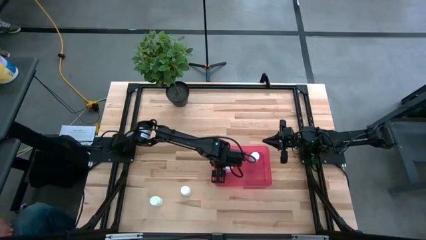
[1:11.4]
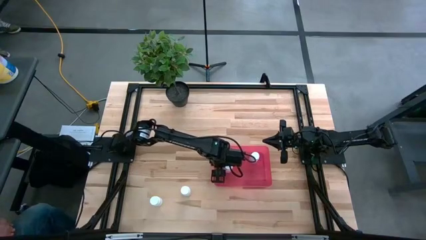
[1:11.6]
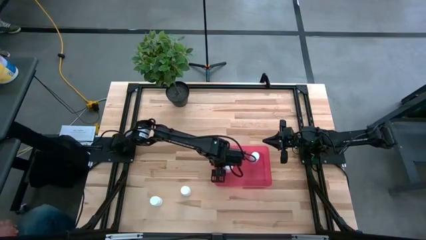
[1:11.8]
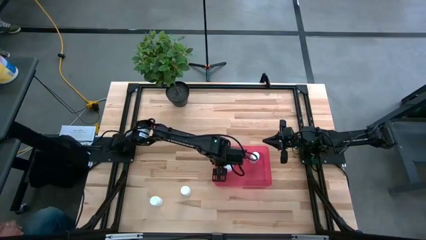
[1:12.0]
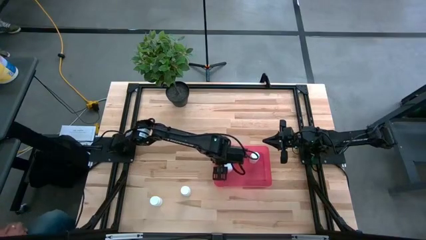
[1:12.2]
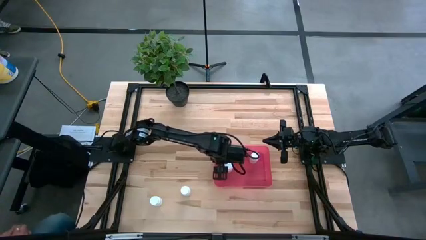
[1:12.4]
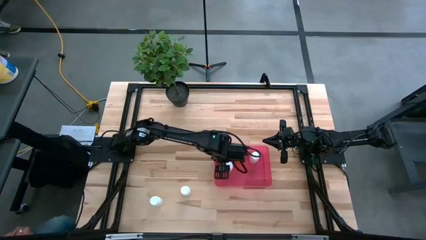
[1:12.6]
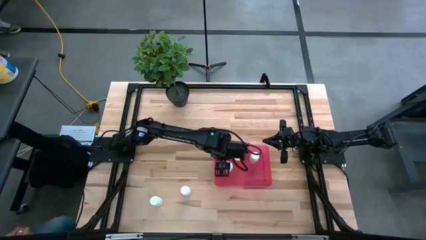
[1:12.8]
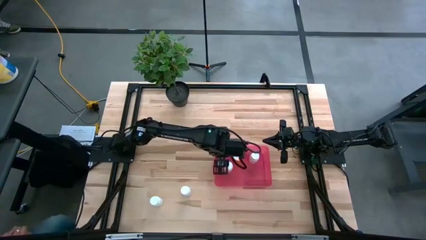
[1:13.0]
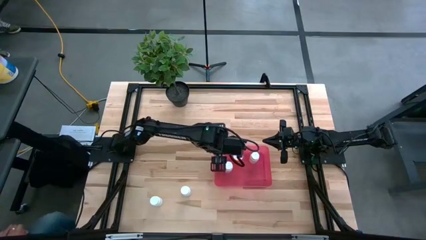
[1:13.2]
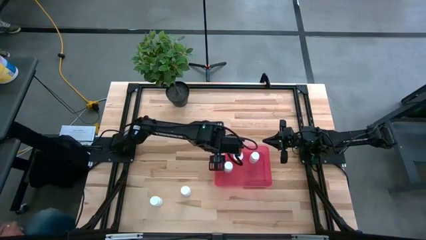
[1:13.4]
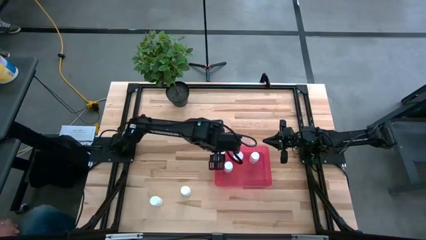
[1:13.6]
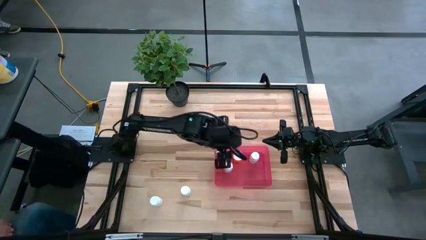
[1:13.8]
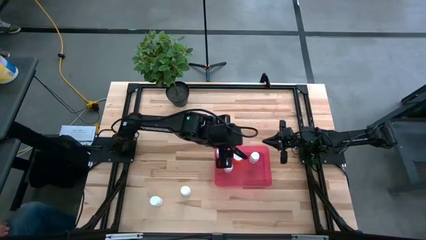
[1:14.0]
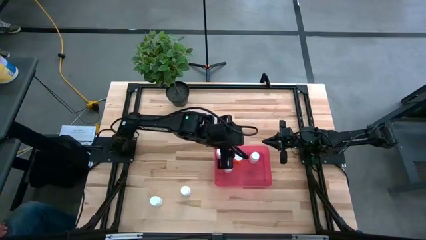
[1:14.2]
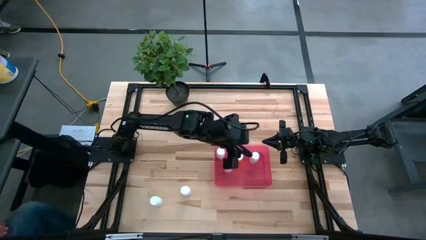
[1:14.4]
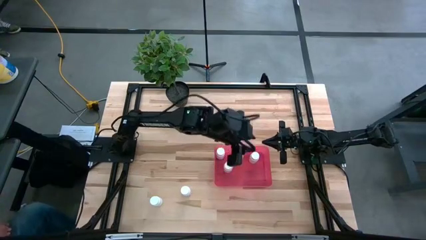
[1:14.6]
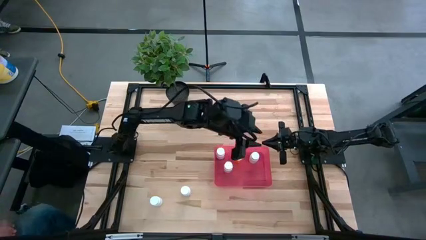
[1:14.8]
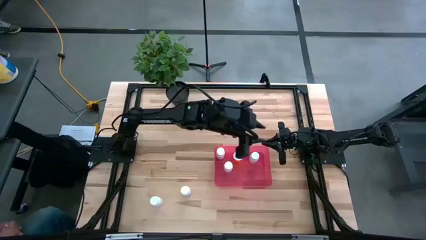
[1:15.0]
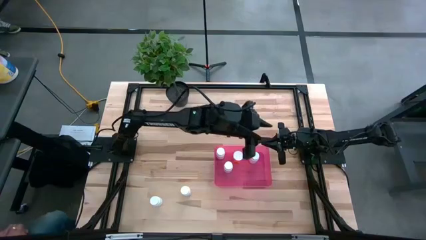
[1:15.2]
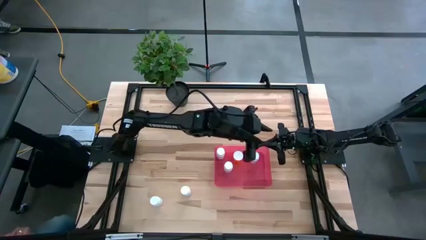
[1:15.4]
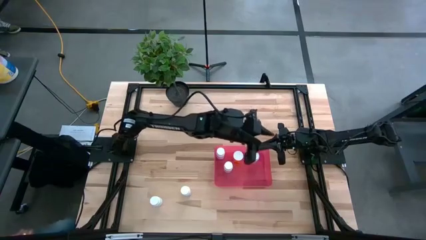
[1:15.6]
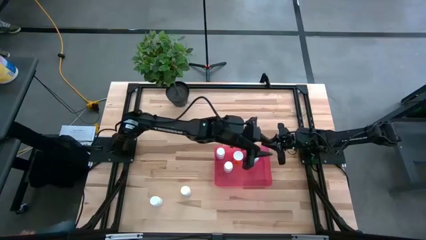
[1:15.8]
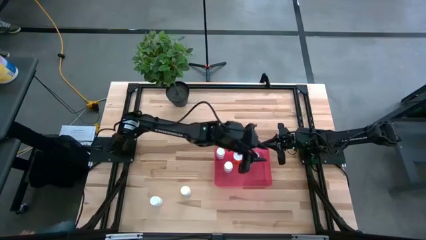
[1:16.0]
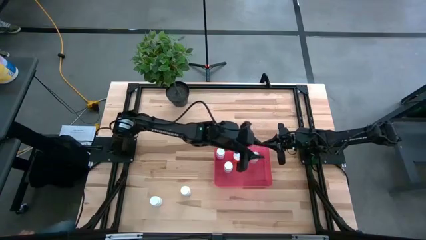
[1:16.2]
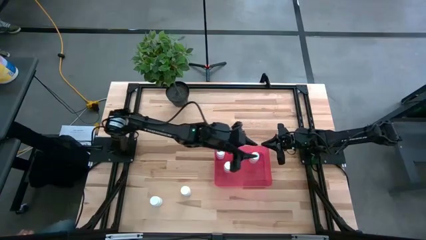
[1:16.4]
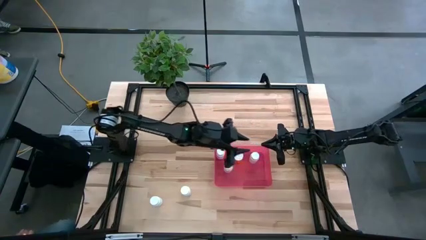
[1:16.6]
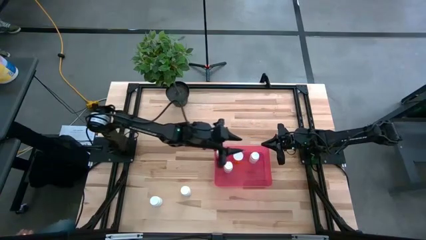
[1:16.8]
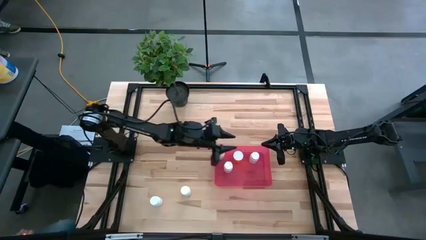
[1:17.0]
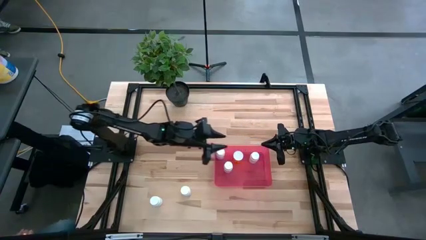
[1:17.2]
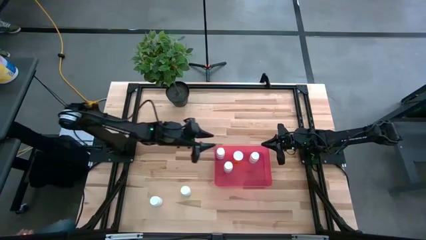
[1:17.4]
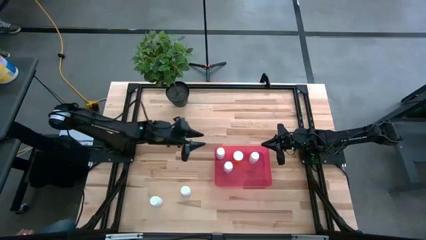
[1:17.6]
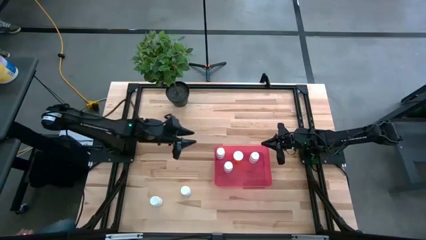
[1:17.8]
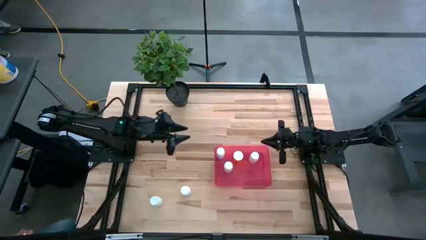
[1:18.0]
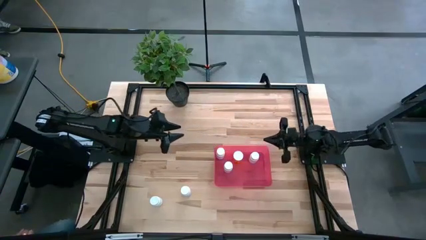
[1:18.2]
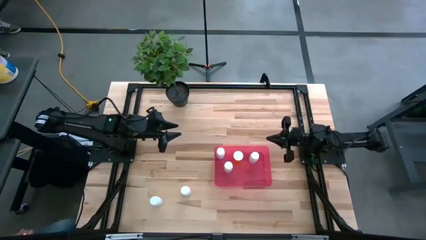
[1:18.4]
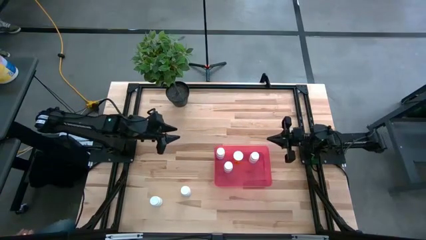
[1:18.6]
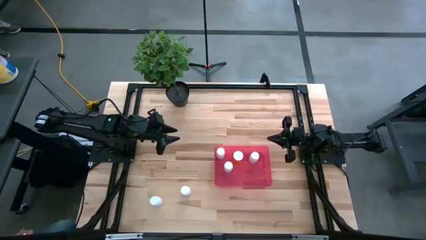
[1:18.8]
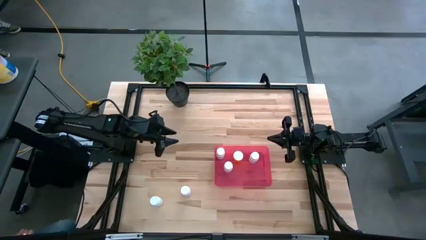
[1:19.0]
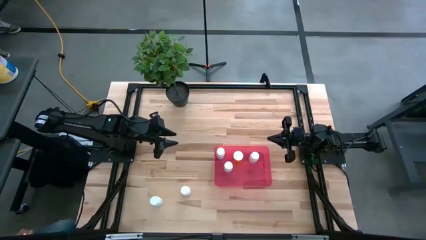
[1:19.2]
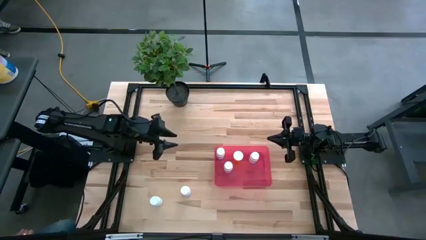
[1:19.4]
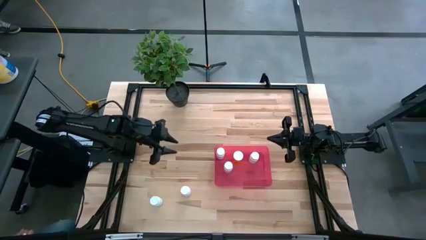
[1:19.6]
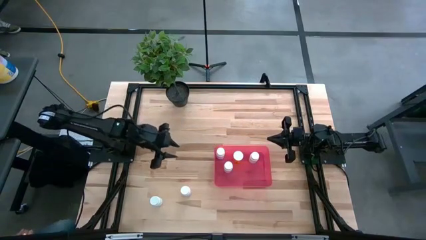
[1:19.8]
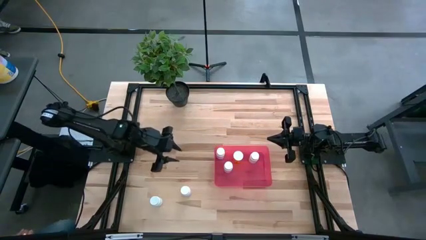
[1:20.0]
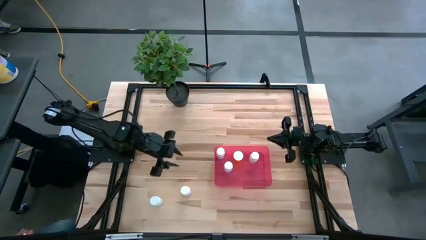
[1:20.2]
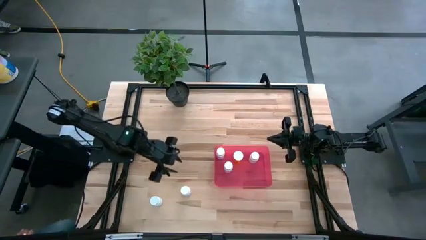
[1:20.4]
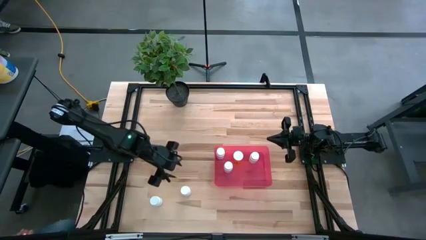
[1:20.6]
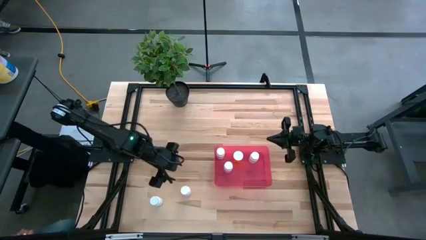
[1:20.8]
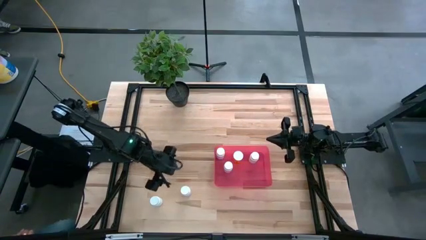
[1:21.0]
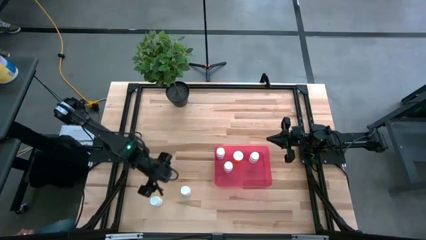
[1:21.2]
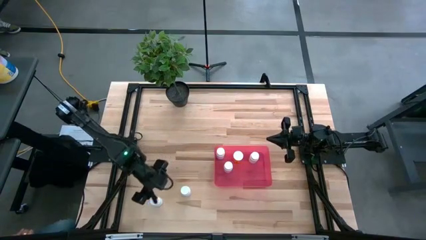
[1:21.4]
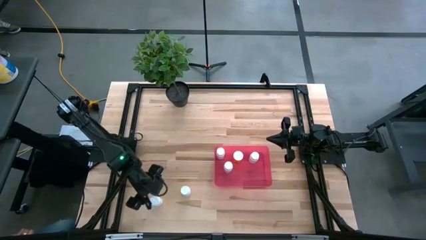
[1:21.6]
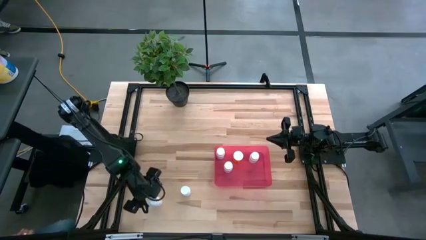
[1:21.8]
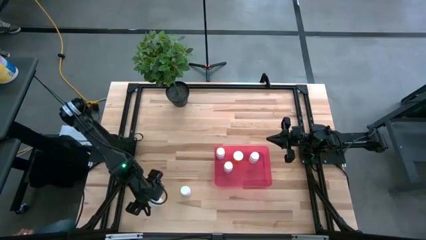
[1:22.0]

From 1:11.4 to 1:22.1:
Task: Pick and place pill bottles into a basket
Put the white pill bottle into the pink bin

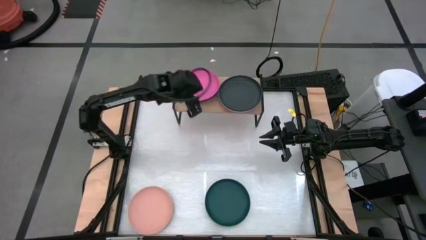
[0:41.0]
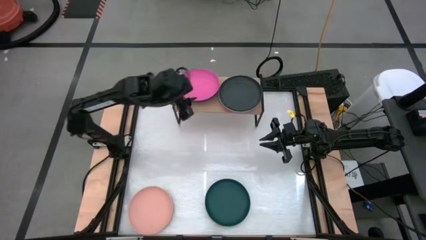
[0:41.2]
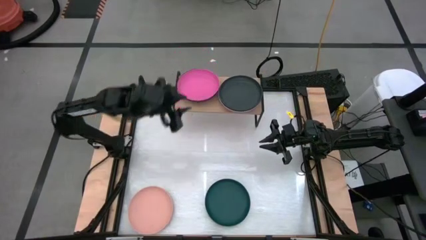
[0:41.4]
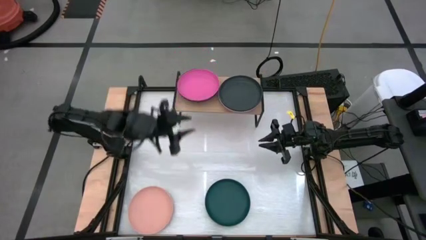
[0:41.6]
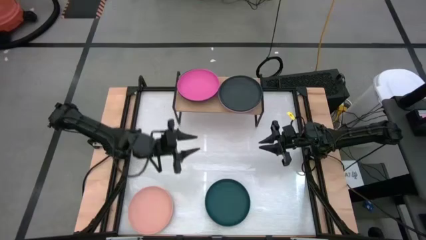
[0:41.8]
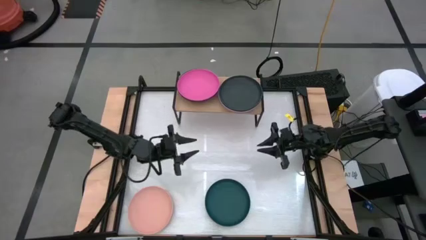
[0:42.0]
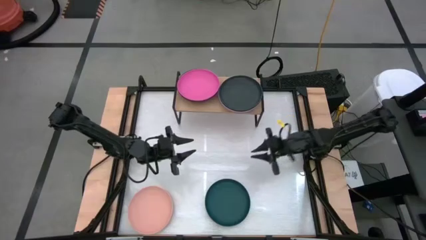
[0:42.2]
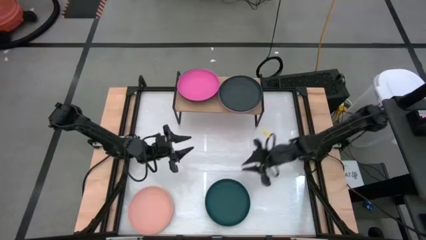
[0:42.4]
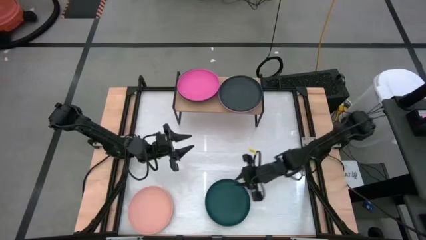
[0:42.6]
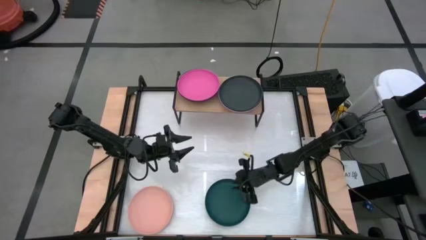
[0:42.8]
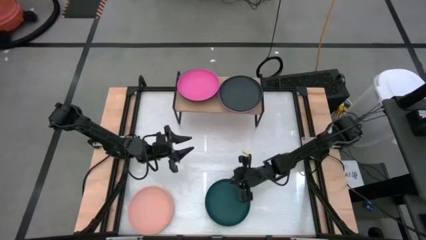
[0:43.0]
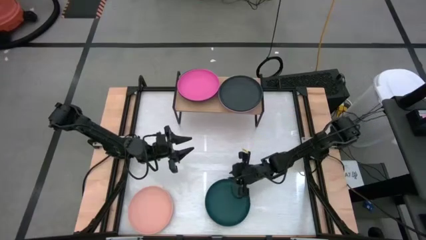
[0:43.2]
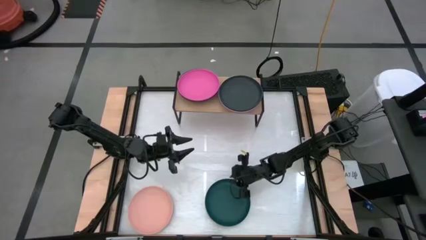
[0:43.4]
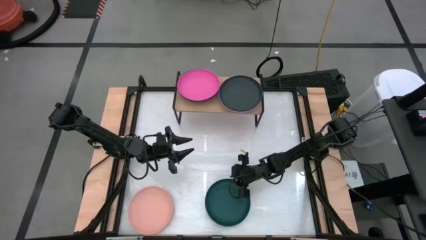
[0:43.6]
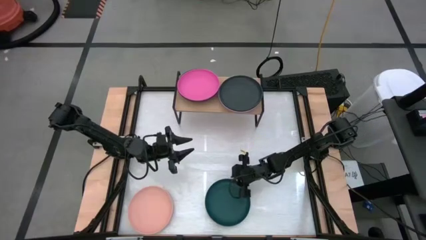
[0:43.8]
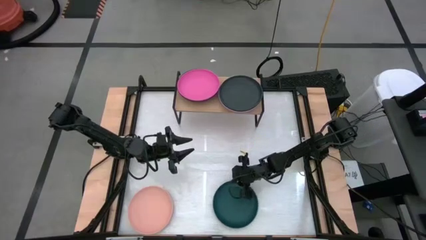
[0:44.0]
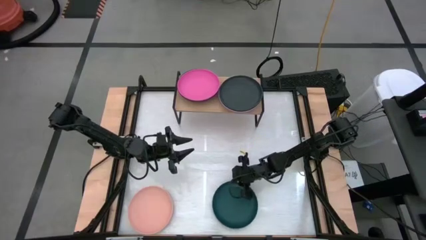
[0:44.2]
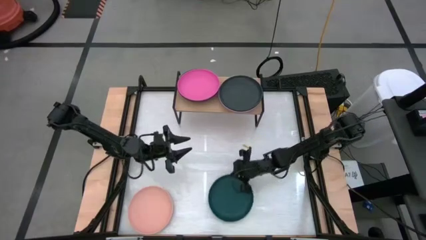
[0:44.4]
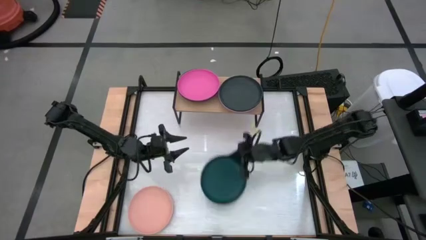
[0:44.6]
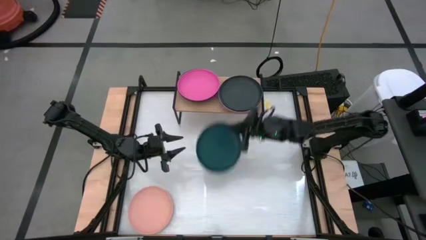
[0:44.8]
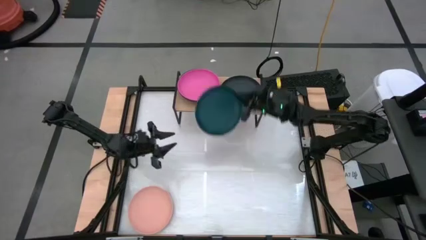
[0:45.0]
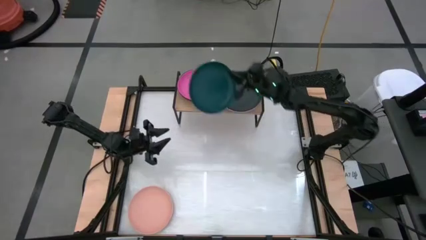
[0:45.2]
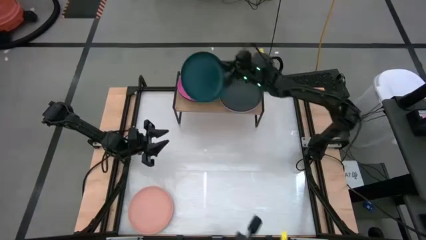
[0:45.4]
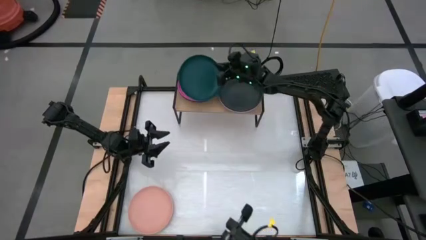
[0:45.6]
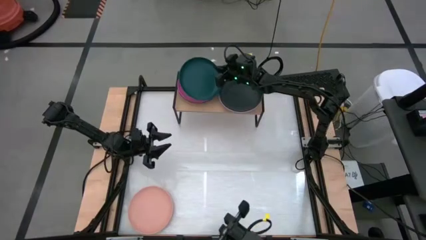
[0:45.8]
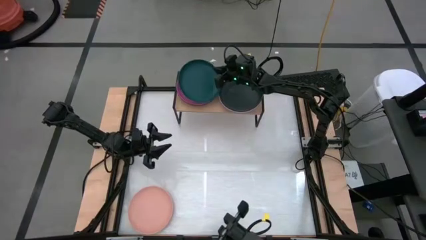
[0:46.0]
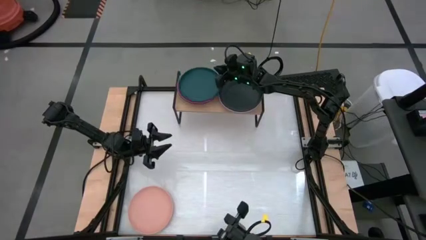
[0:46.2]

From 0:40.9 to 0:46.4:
Task: Place and stack plates onto a shelf
Stack the dark green plate on top of the pink plate on the shelf
